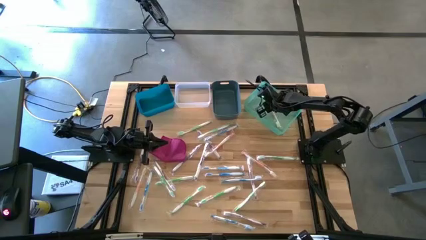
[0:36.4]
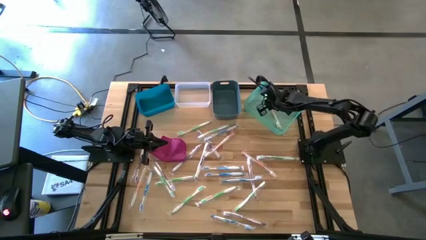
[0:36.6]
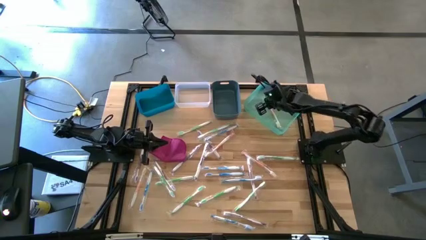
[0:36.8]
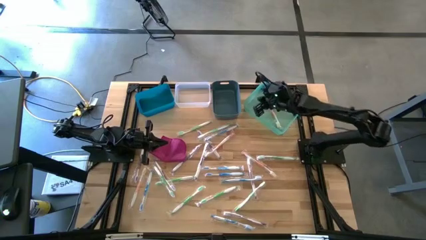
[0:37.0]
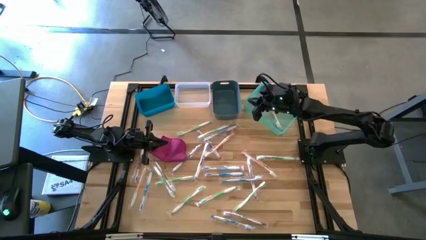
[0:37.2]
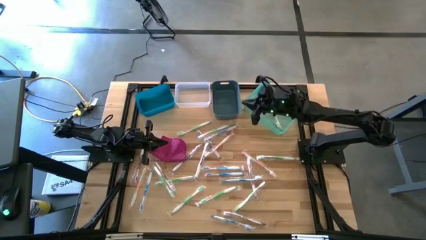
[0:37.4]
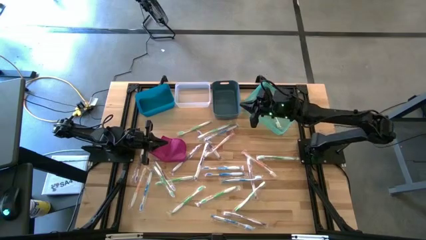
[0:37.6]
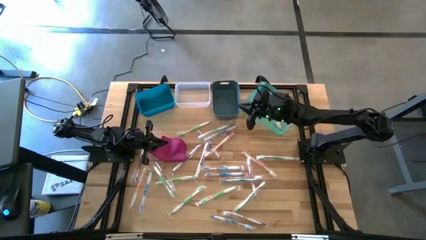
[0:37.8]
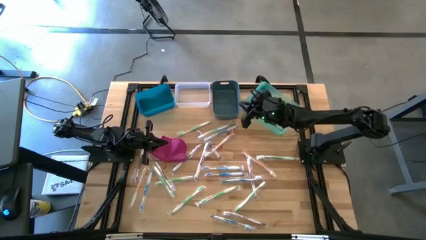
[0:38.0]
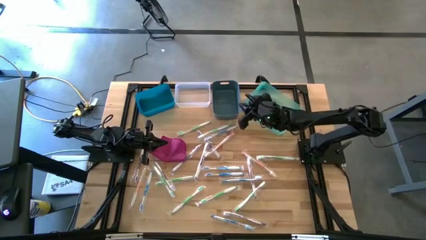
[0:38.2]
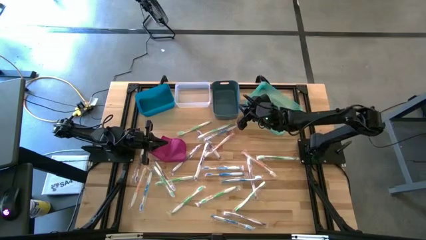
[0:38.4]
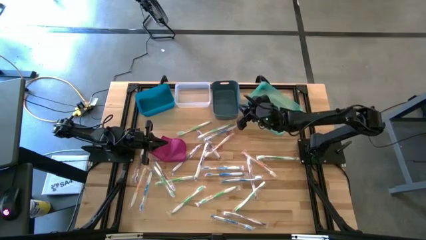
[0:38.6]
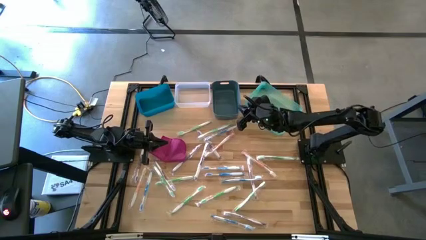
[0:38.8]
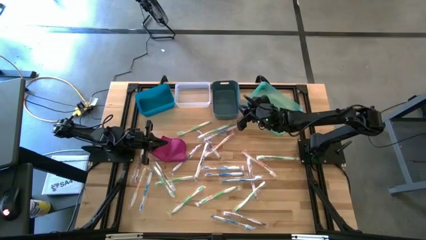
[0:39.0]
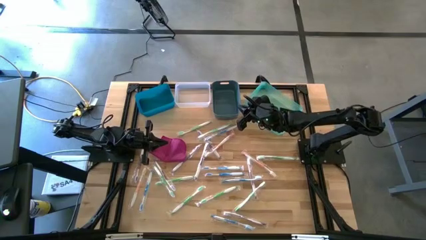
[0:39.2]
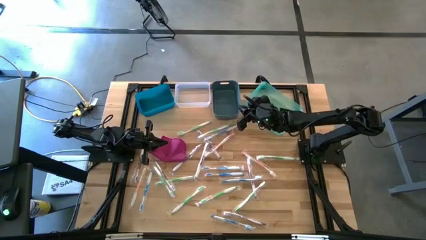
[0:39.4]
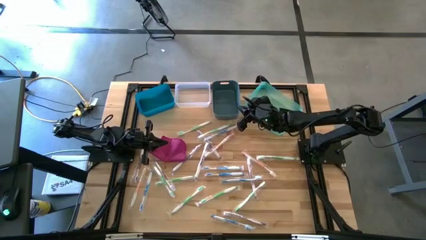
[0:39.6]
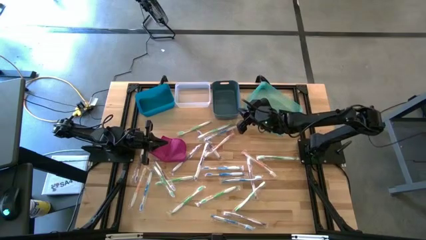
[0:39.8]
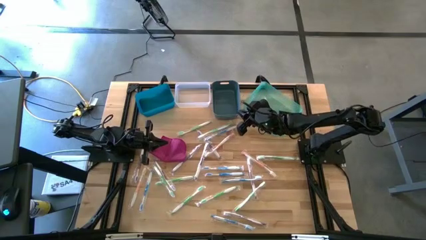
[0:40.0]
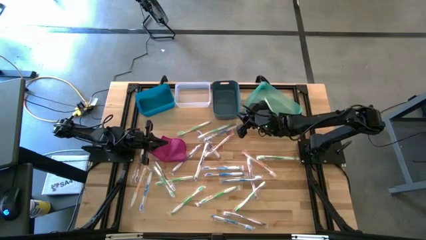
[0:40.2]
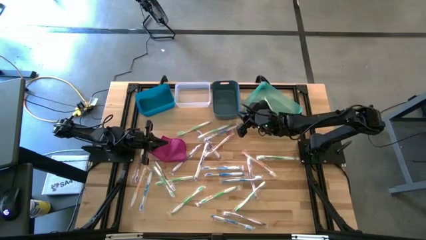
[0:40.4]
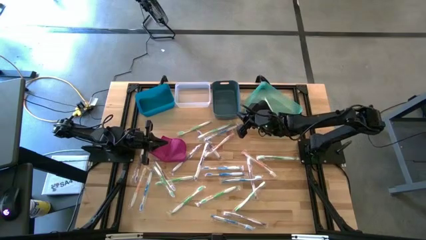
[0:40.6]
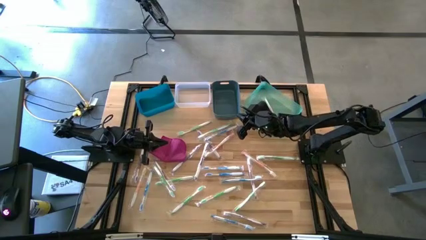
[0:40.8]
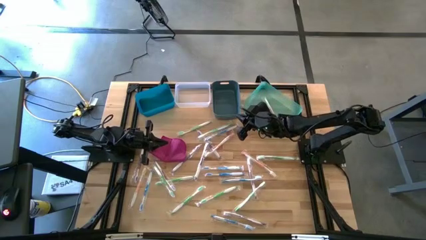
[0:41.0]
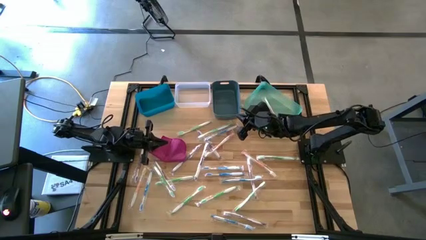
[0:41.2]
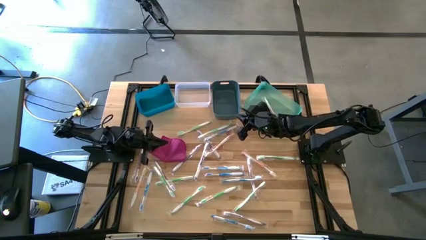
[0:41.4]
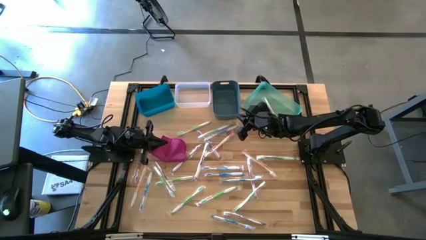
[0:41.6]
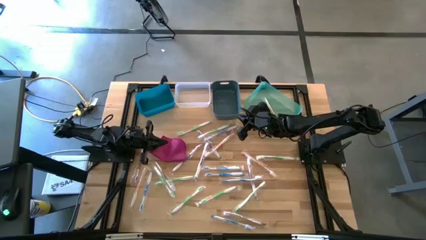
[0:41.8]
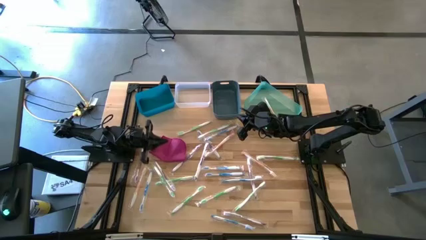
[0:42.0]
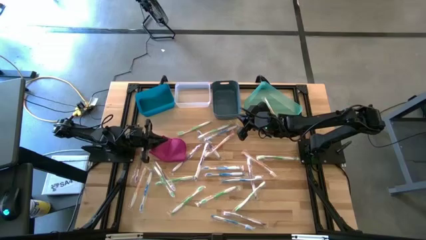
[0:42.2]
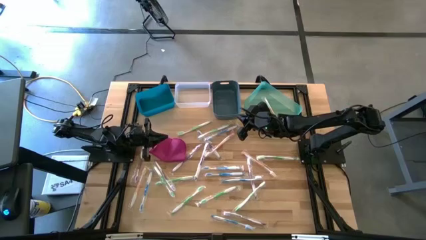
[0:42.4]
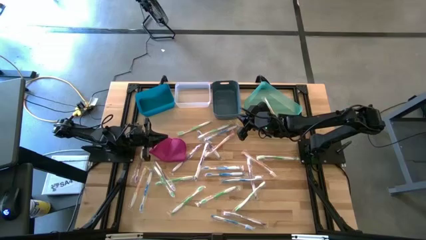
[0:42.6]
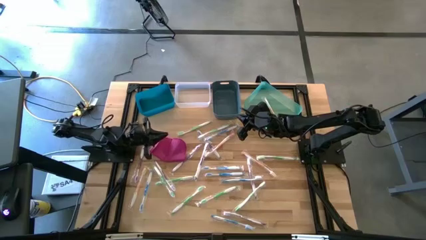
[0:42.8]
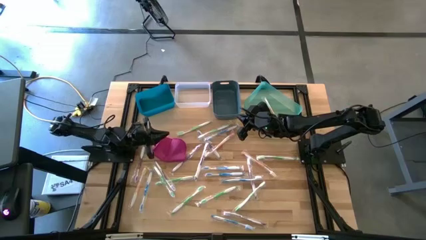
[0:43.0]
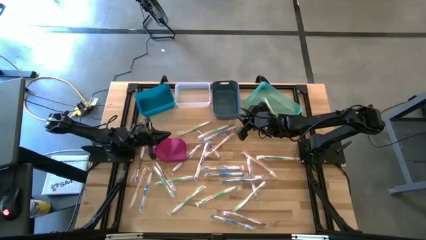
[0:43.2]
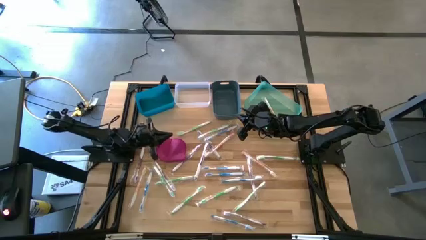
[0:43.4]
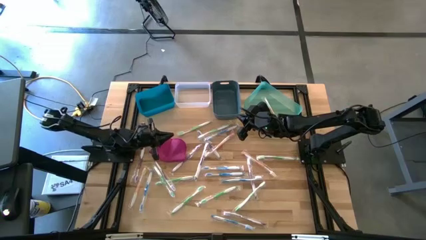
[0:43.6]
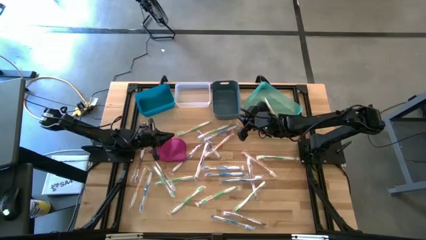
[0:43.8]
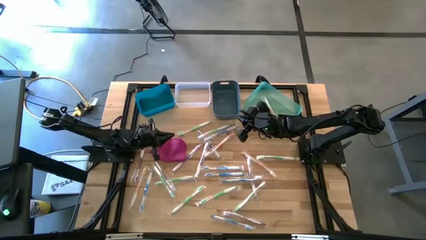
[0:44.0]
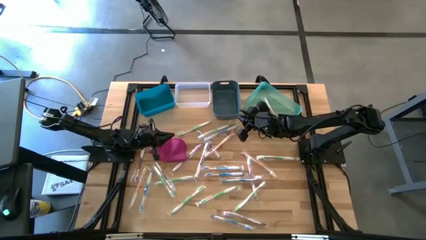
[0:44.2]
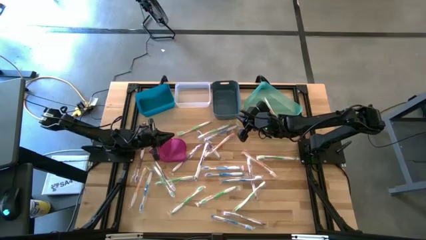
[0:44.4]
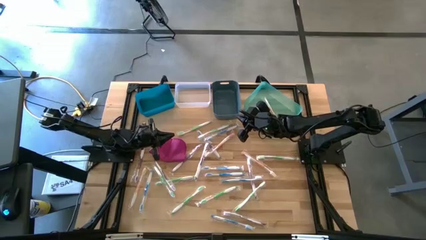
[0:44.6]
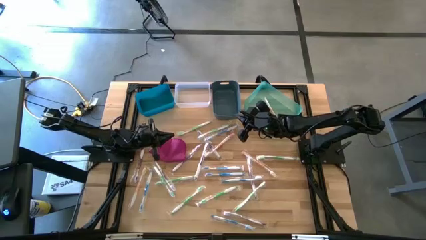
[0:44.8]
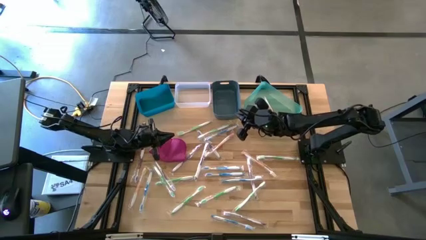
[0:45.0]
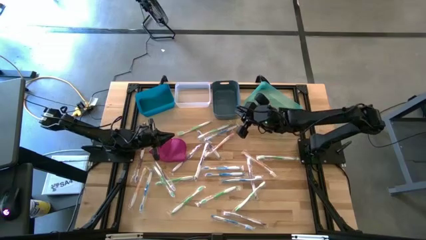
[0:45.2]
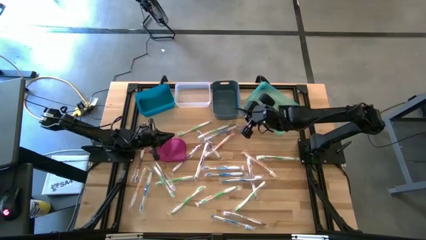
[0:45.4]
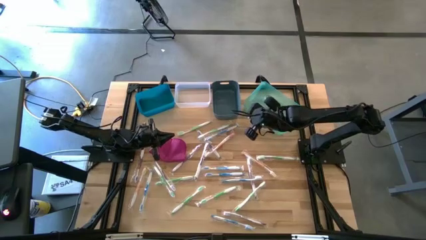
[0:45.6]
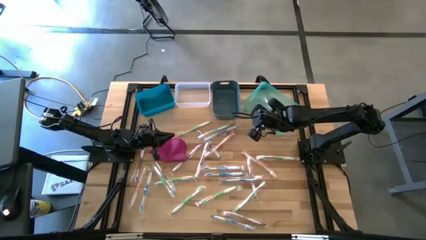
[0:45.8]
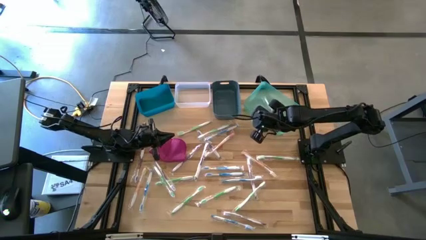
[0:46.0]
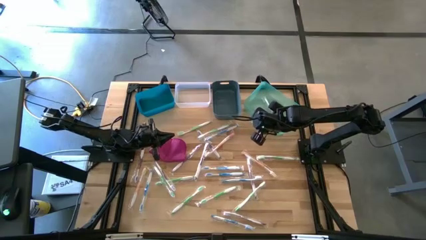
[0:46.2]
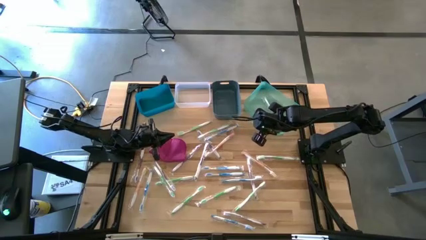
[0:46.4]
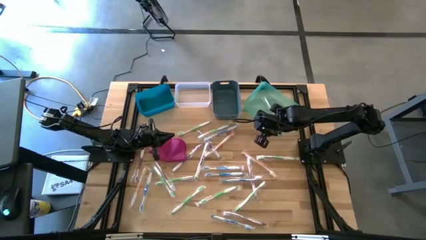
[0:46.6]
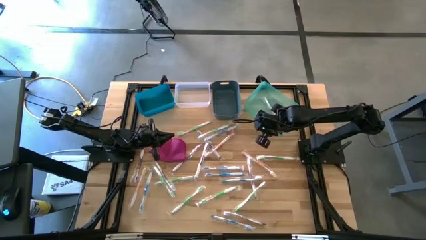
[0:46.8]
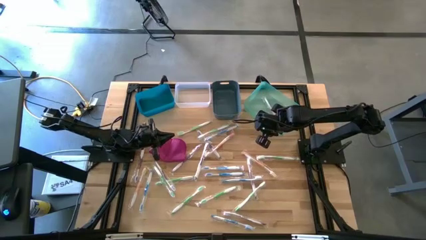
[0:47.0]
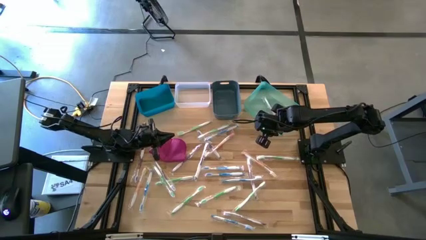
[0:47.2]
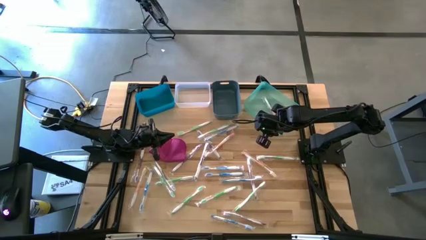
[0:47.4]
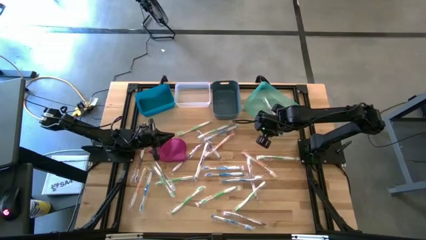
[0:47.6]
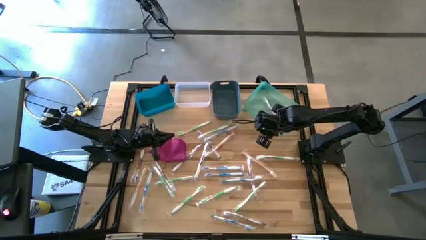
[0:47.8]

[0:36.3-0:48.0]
Task: Pick & Place Toothbrushes
Put the green toothbrush into the dark blue bin

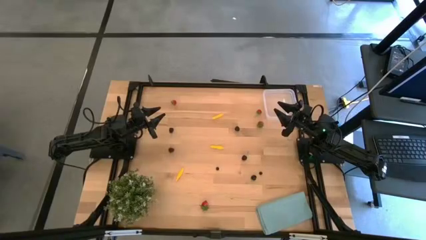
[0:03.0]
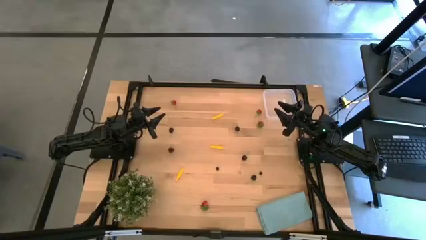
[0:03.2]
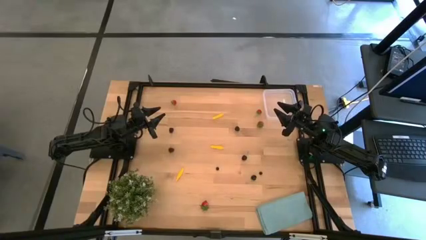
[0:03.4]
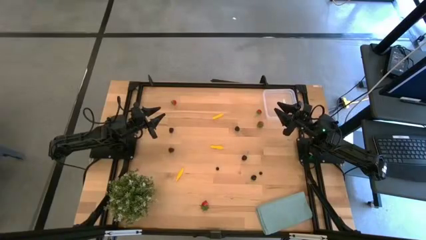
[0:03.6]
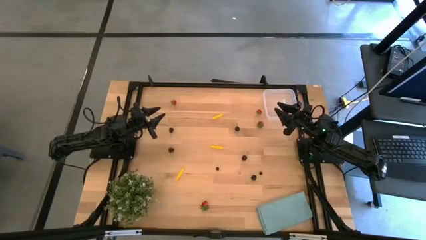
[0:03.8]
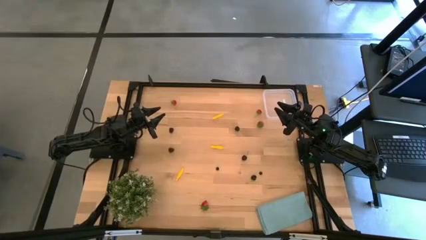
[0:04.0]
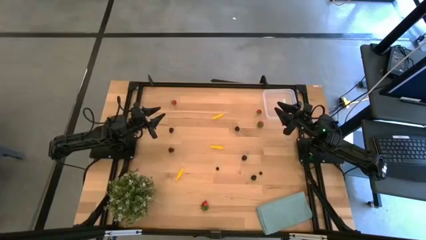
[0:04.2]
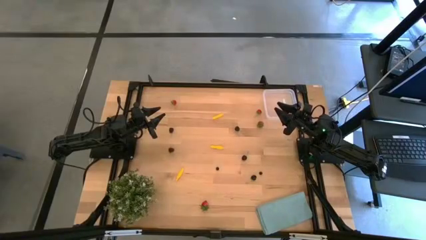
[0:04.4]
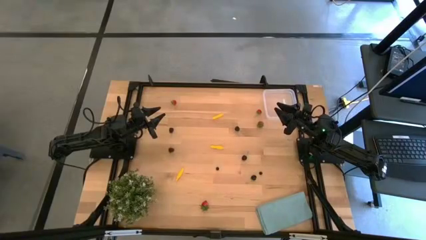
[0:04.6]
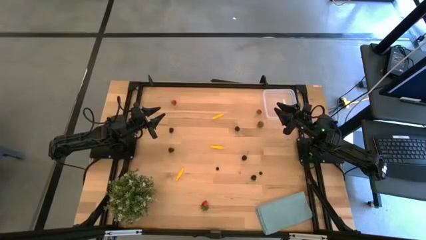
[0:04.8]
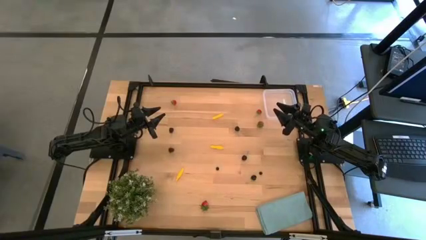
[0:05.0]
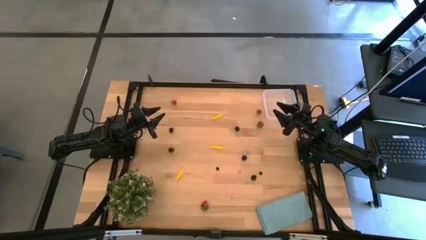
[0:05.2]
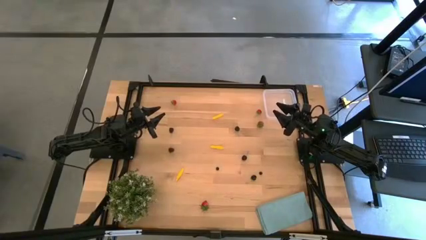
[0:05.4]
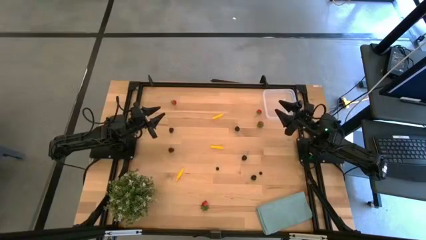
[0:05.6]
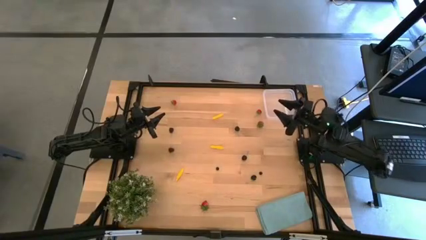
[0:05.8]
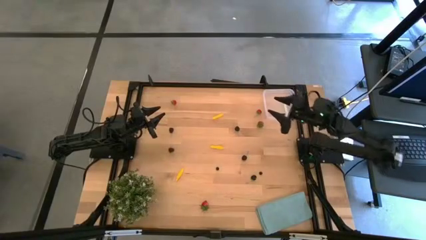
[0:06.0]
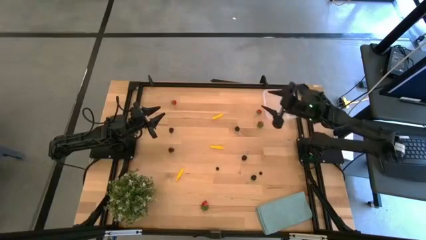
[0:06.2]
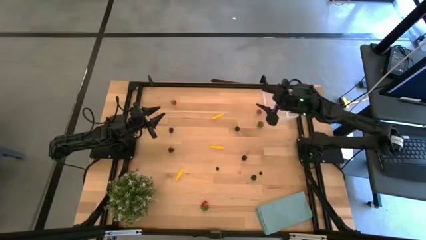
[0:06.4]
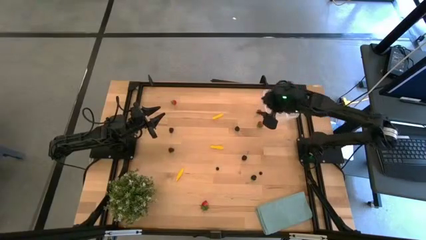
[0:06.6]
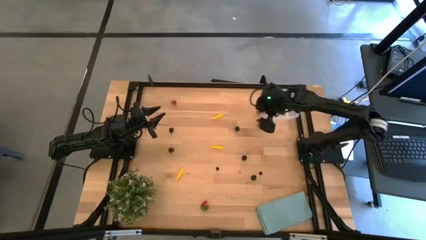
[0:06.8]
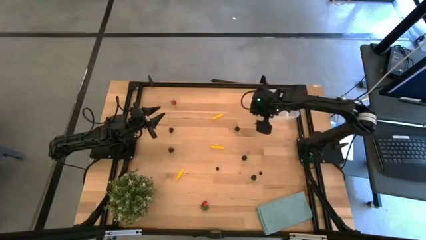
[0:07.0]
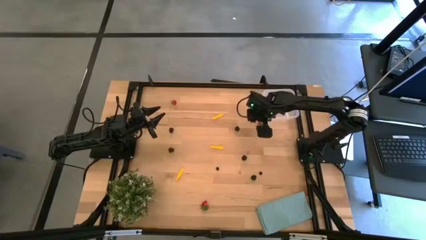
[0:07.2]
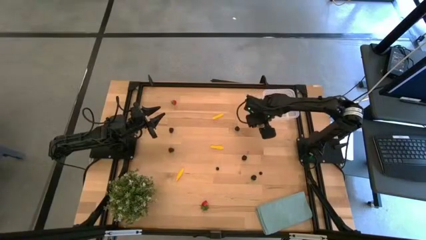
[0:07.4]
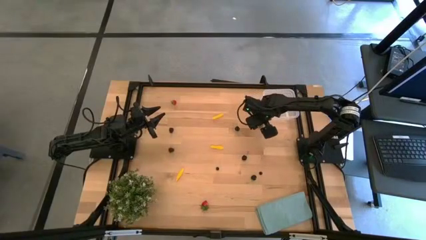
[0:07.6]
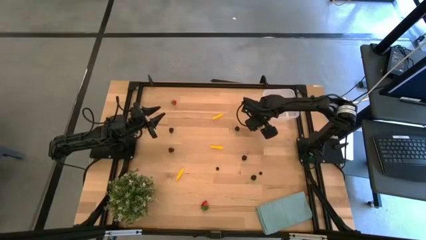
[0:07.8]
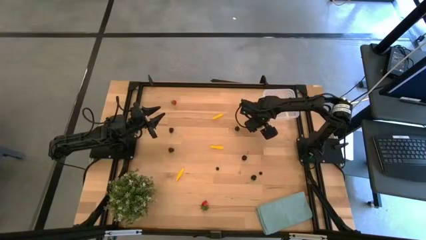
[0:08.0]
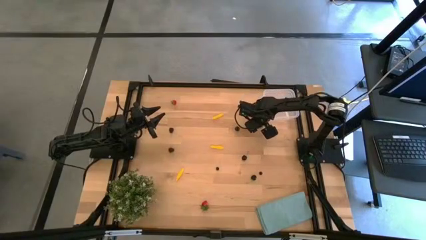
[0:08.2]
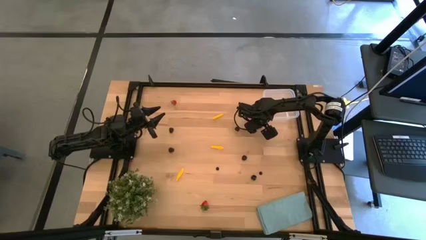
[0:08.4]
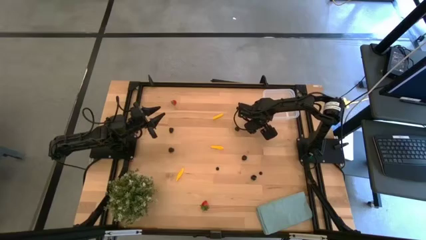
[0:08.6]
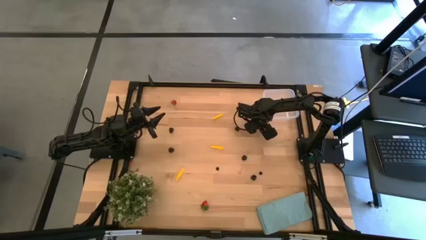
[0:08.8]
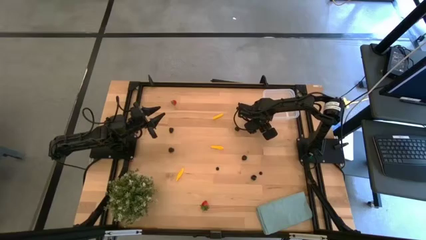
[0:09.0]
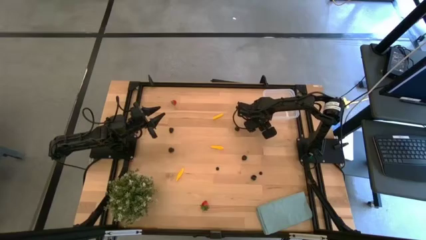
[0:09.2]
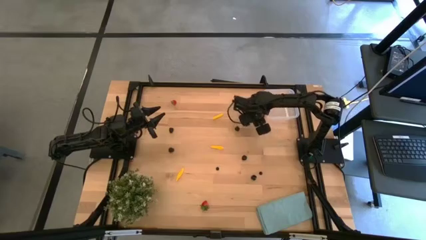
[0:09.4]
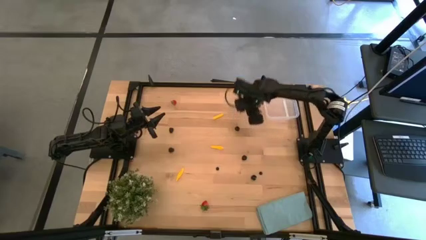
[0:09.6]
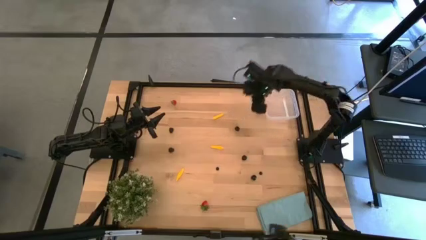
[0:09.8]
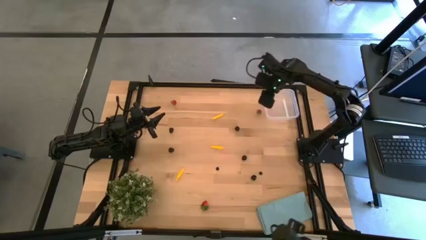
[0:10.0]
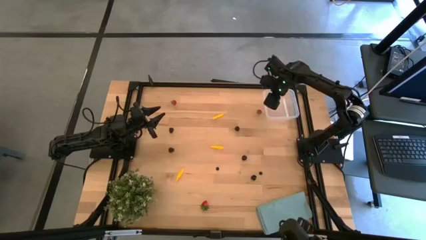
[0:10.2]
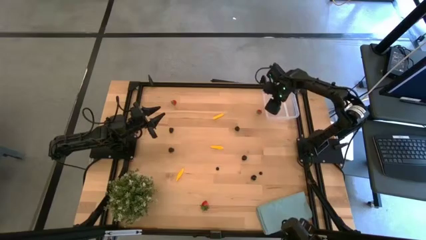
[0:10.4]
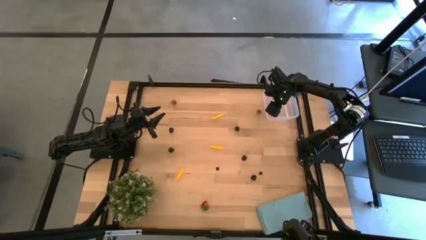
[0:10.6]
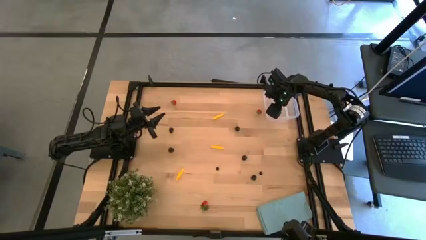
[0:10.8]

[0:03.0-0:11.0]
Task: Pick and placing Produce into tupperware
Put the red strawberry into the transparent bin
